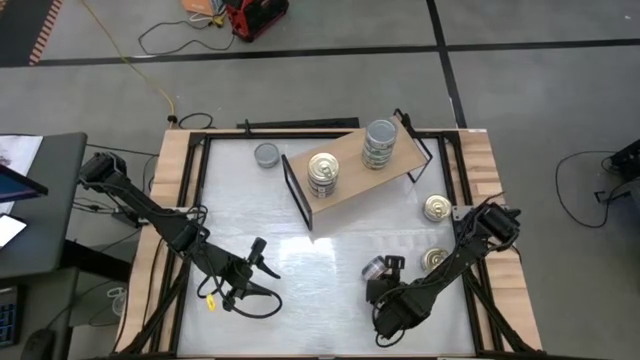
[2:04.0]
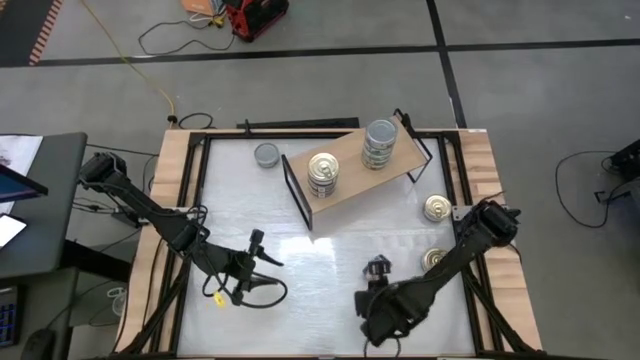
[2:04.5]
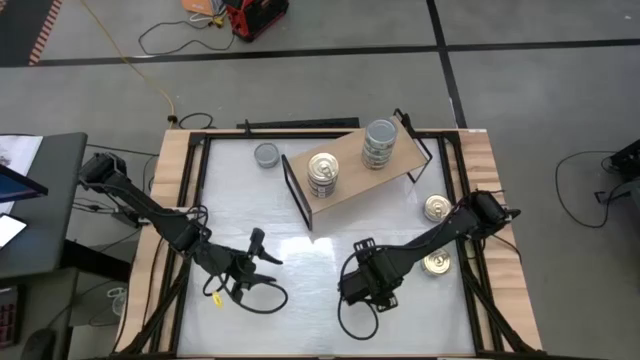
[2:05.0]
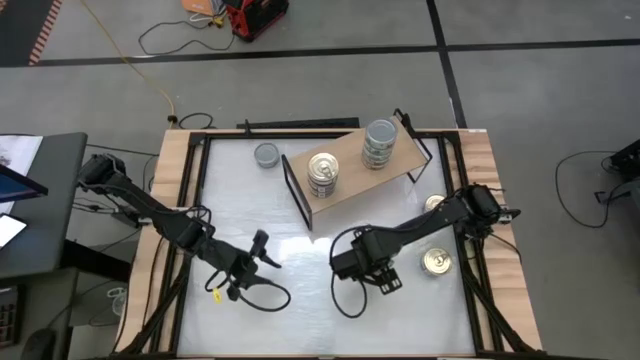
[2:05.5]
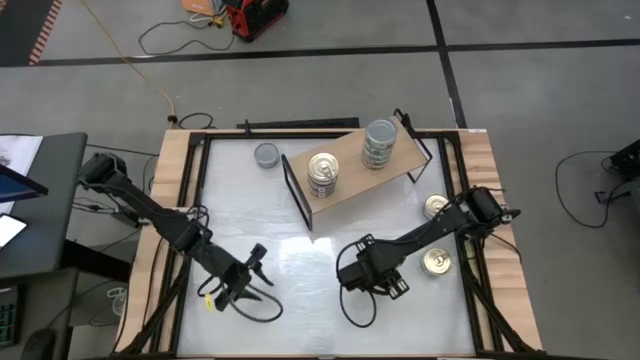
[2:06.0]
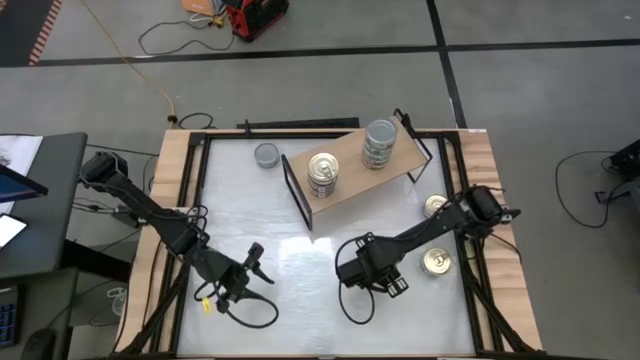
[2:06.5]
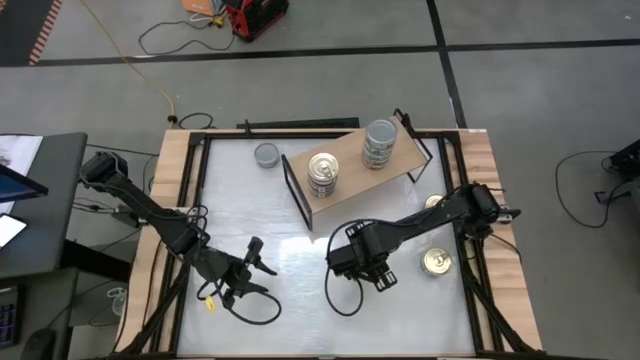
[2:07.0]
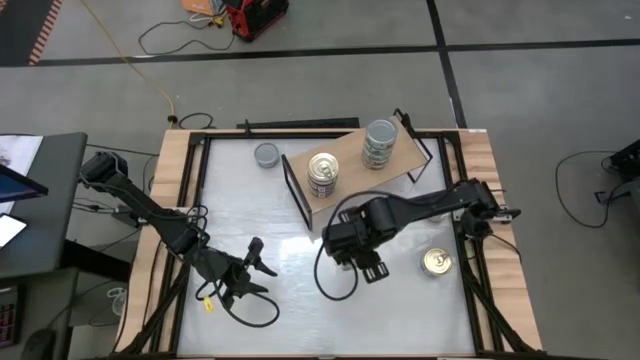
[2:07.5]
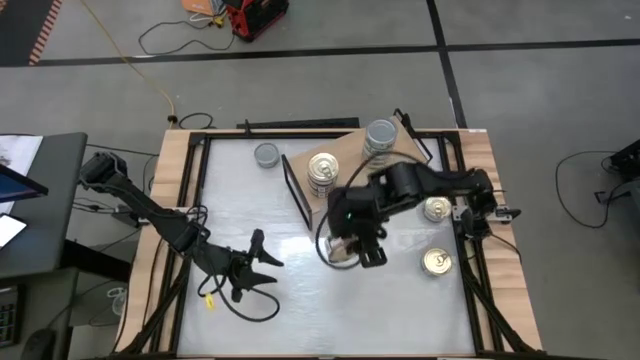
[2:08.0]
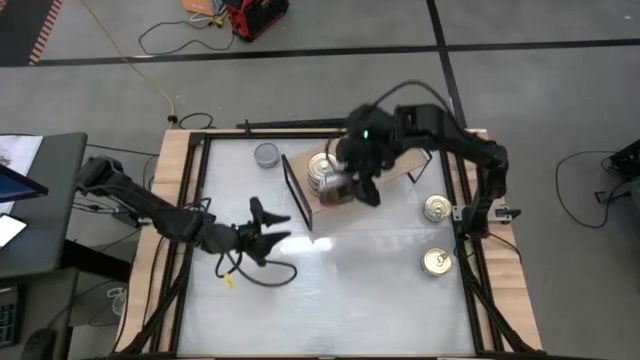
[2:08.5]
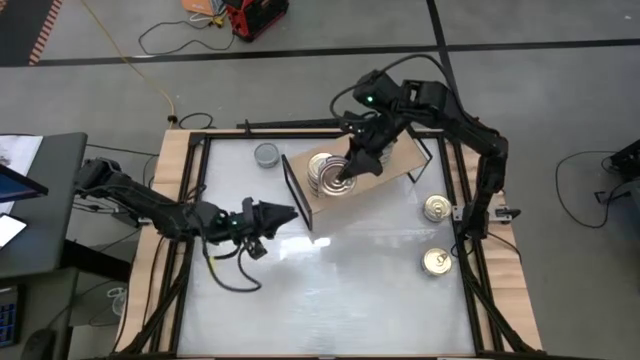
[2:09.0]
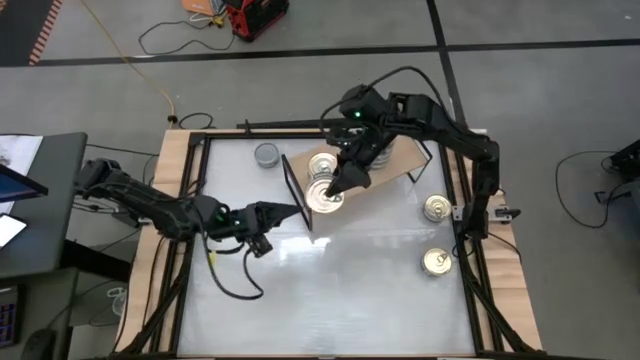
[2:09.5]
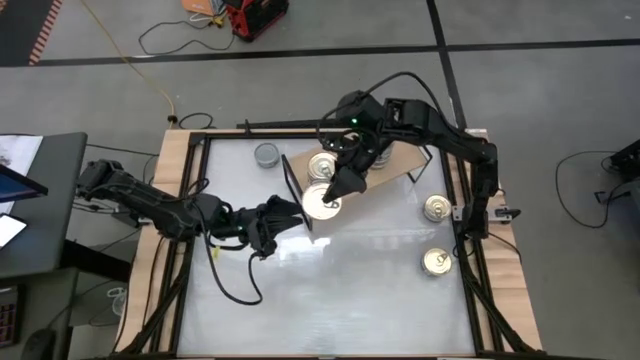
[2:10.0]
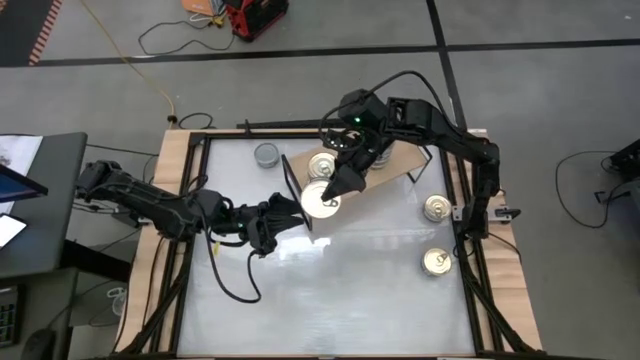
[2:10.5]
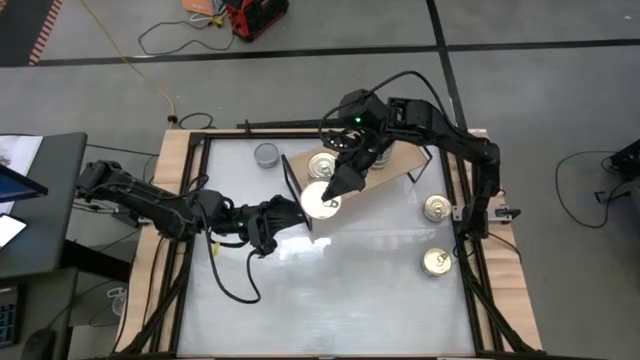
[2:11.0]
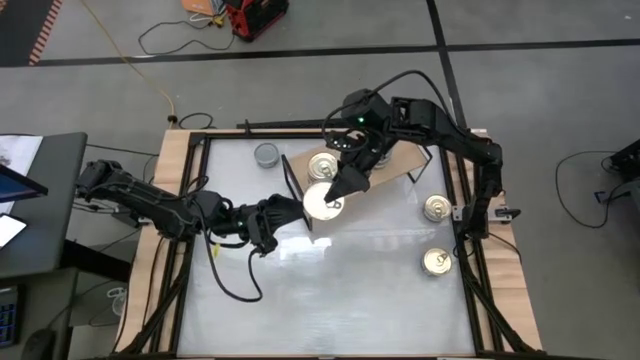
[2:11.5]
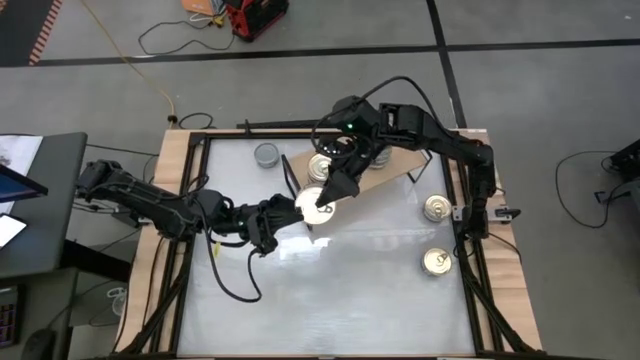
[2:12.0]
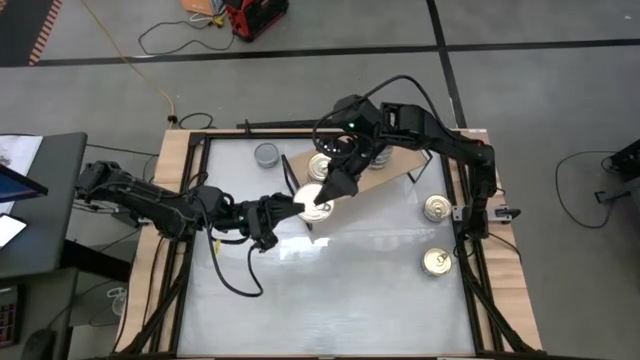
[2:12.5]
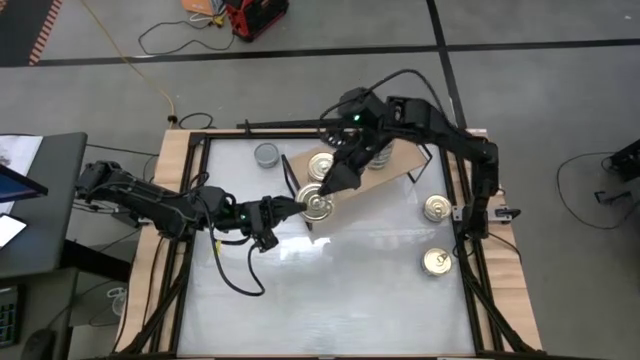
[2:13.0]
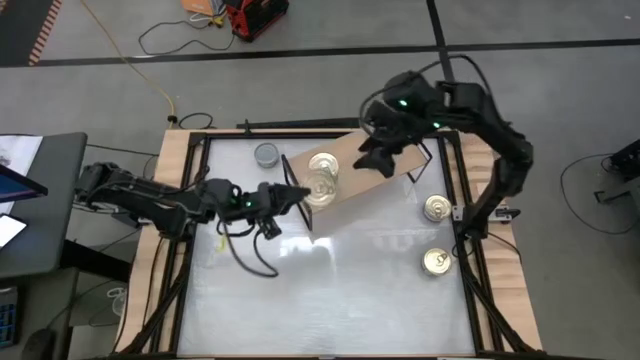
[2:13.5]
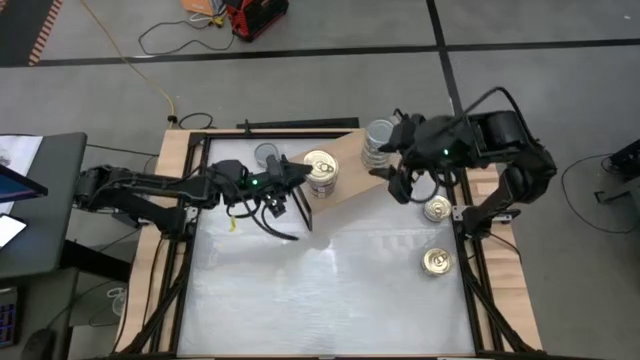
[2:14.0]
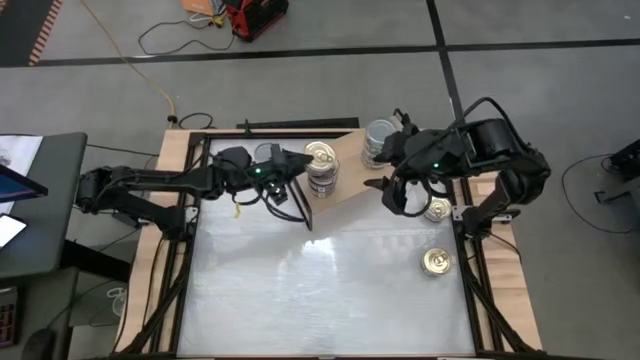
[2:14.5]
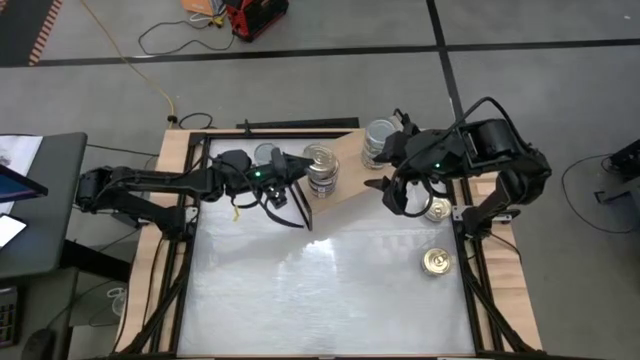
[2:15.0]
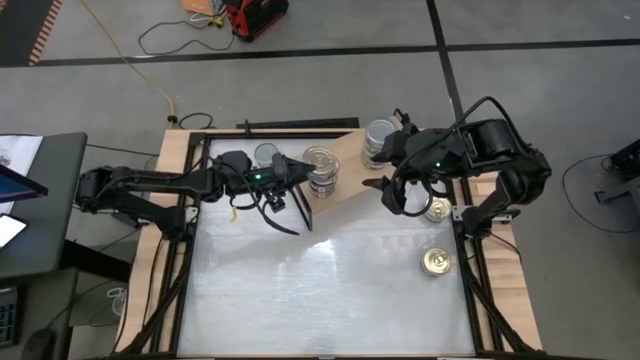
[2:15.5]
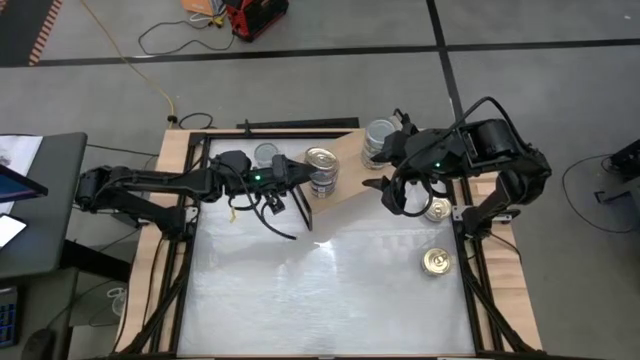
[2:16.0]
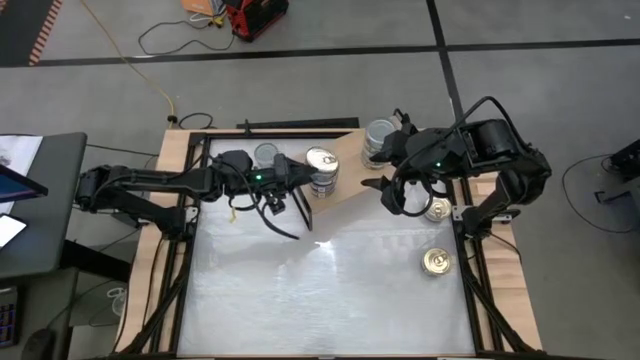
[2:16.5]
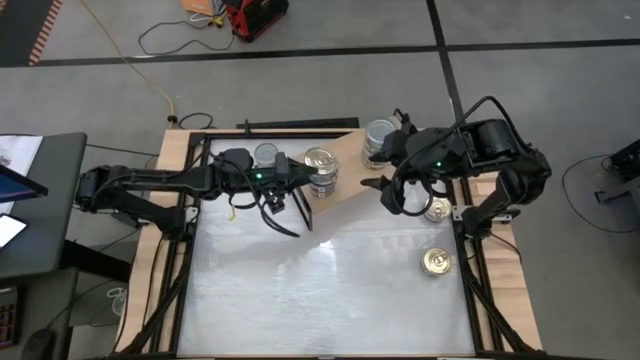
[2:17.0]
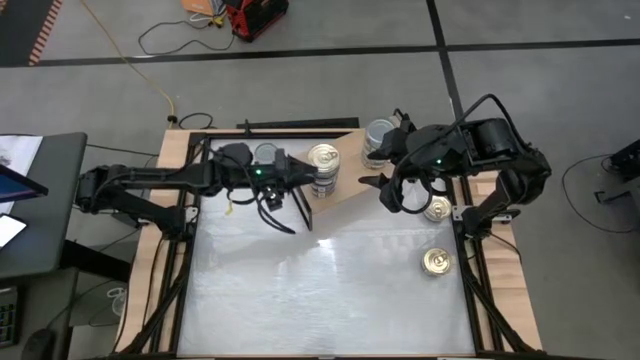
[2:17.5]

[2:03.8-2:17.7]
Task: Stack canned seafood by type on shelf
Stack the blue tuna can on top of the blue tuna can

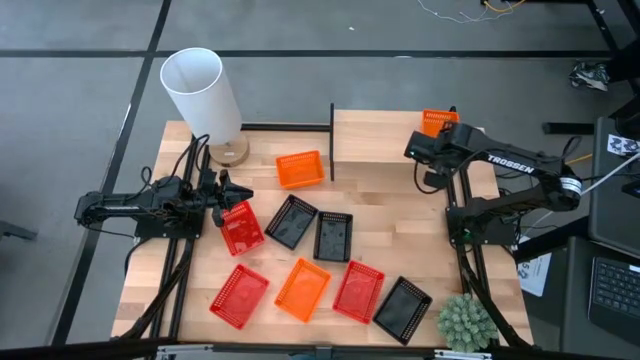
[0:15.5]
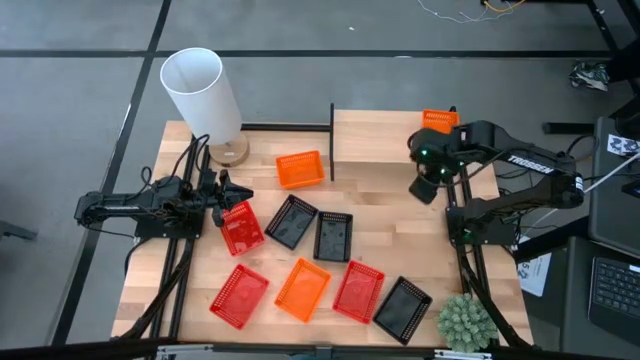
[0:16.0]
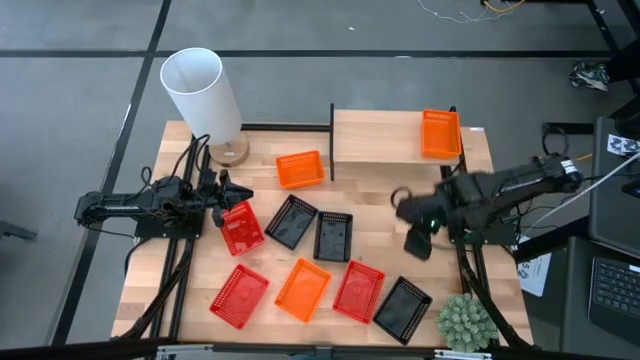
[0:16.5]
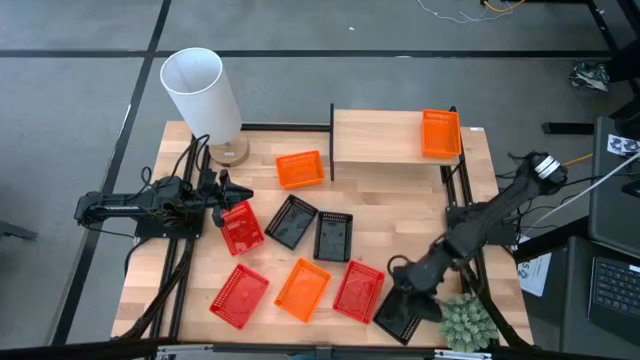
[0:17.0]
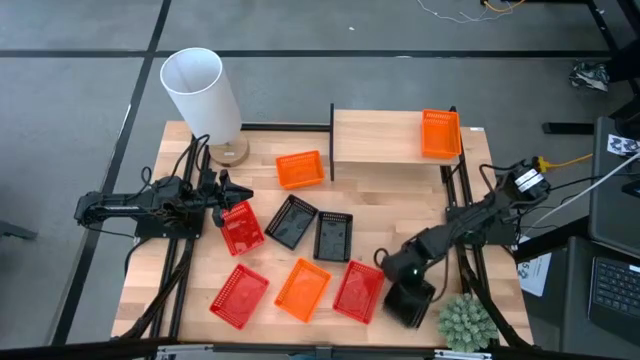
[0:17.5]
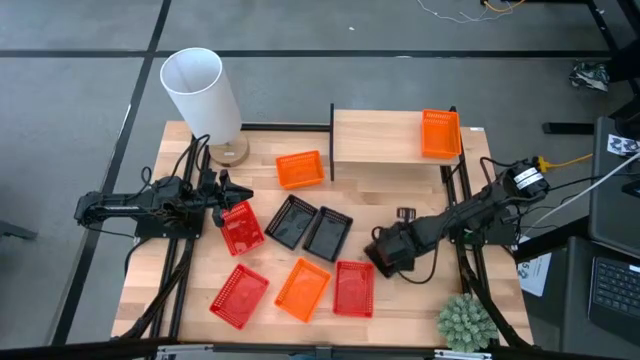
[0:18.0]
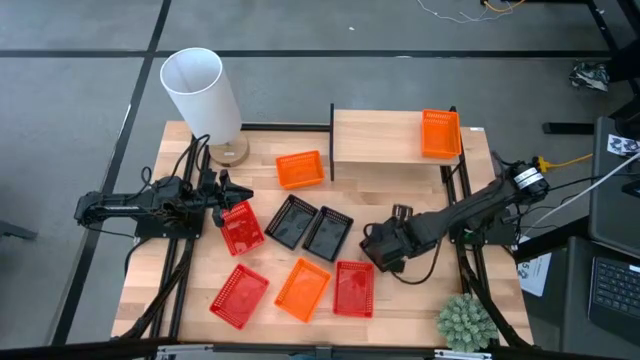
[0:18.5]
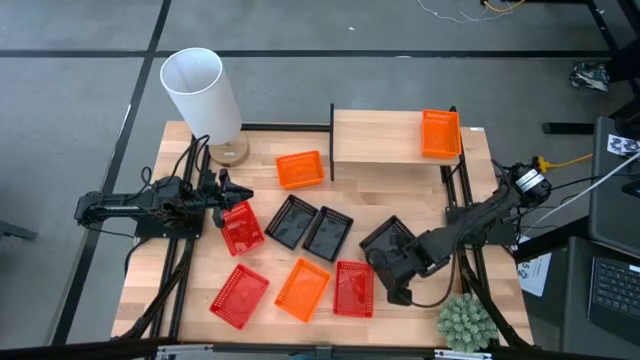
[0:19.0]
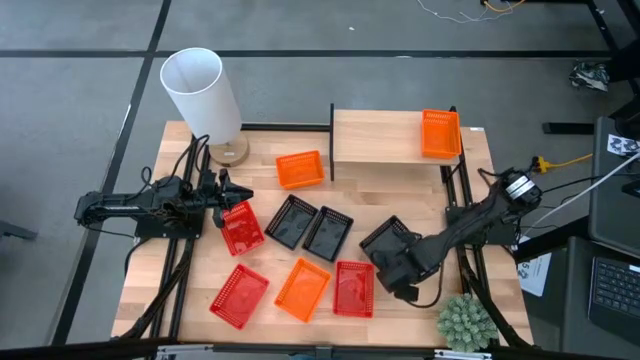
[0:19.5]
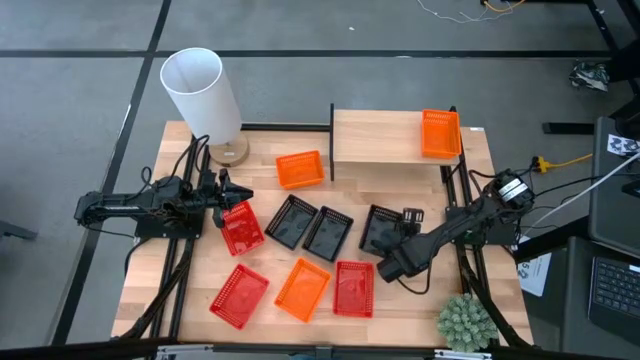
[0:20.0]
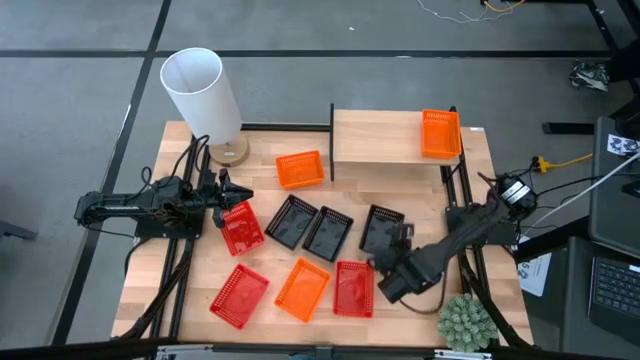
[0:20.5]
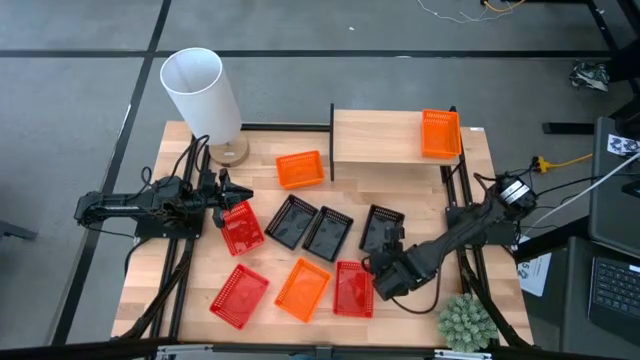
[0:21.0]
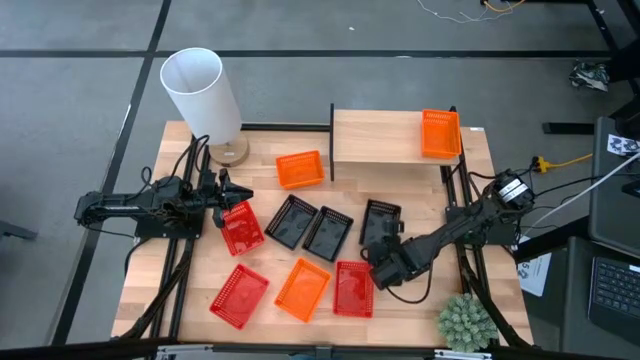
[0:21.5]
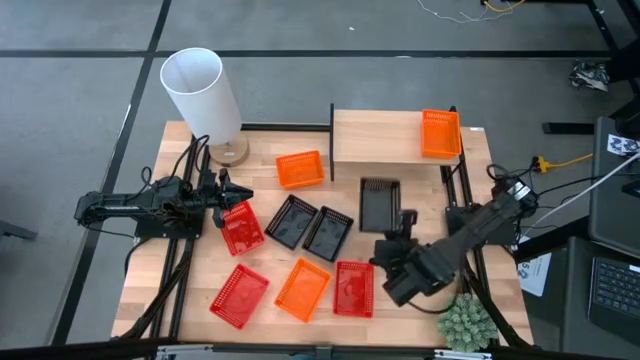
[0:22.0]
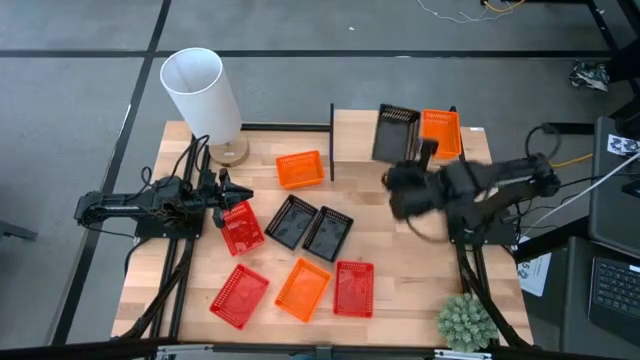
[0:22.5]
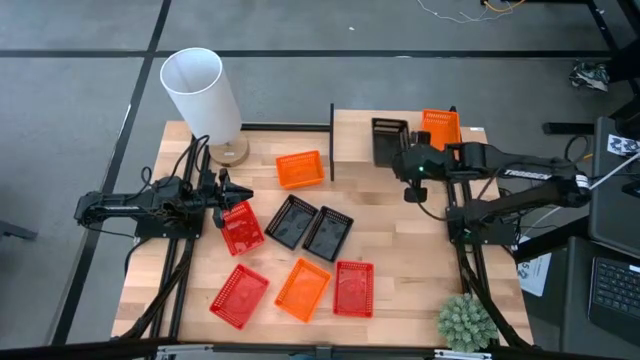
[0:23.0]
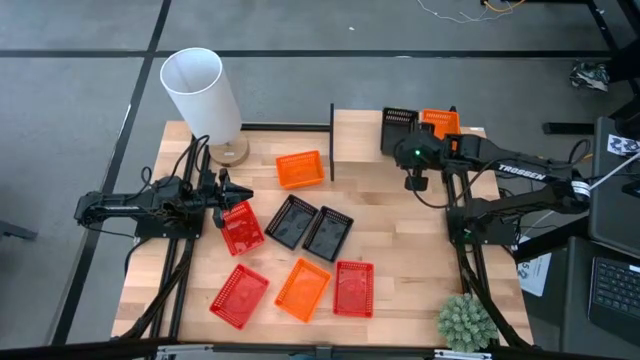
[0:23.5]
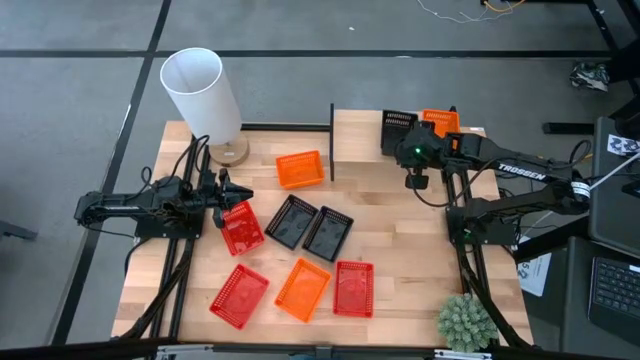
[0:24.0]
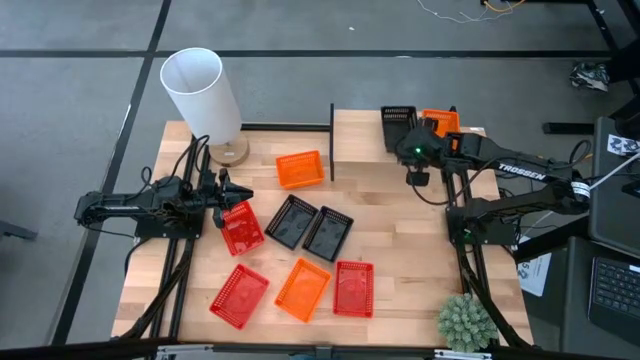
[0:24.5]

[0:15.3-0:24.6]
Task: Stack baskets on shelf by color
Put the bottom black basket on the shelf
